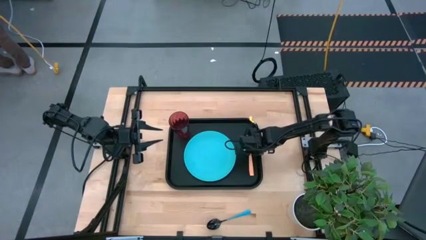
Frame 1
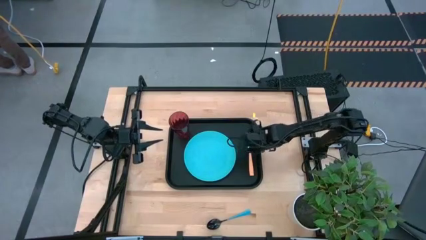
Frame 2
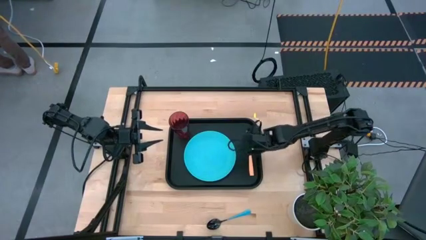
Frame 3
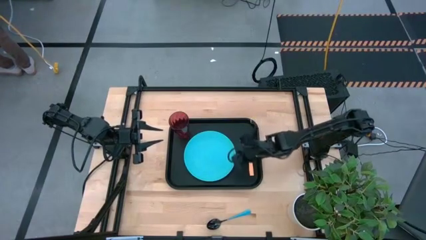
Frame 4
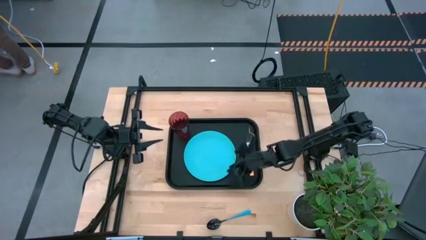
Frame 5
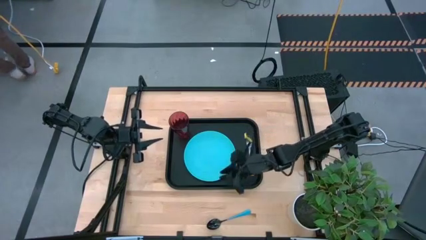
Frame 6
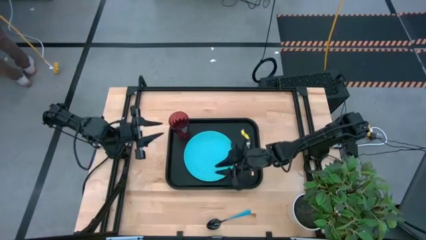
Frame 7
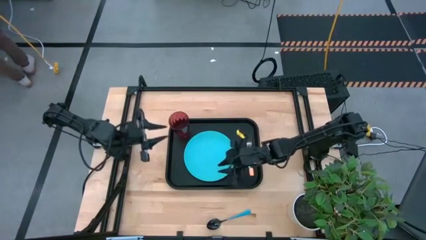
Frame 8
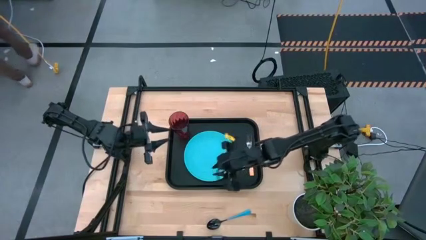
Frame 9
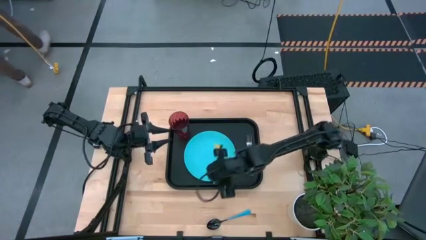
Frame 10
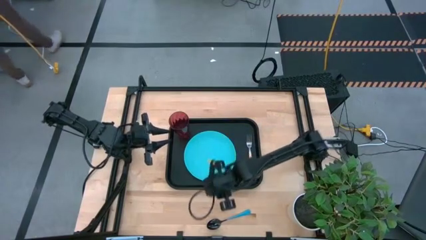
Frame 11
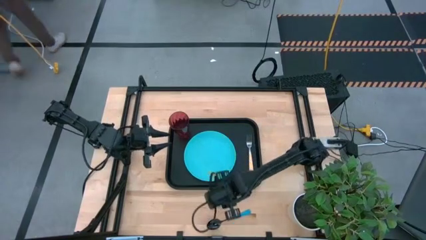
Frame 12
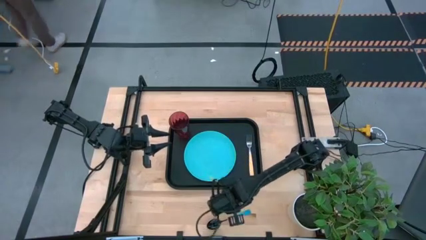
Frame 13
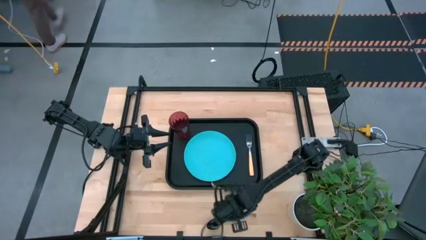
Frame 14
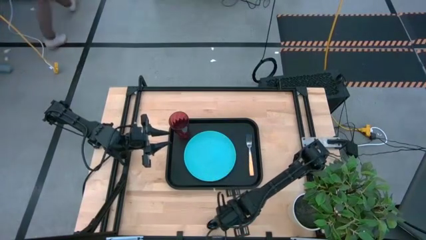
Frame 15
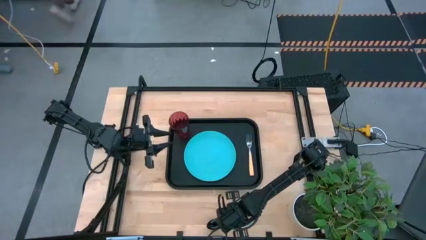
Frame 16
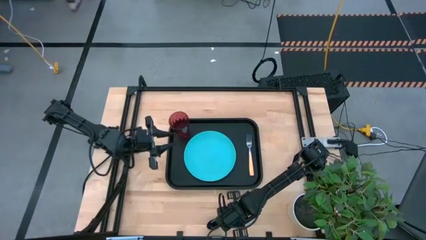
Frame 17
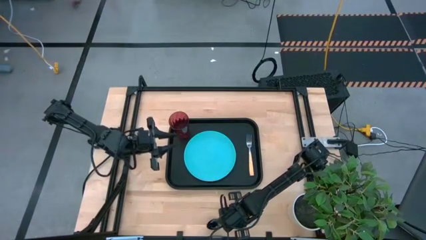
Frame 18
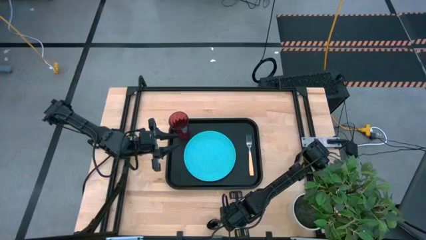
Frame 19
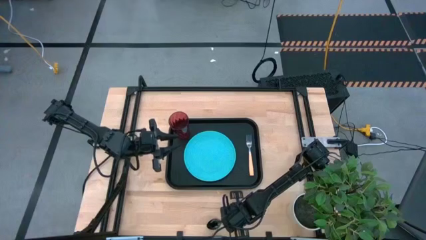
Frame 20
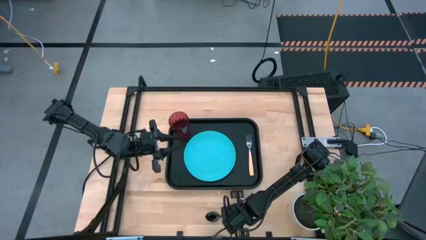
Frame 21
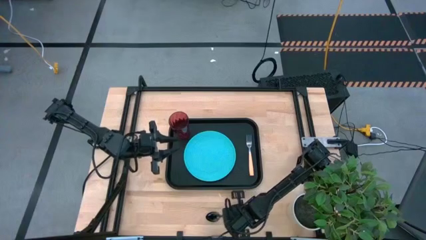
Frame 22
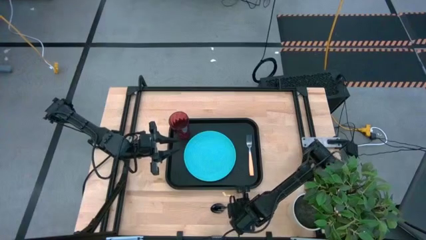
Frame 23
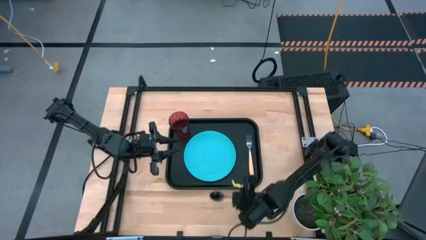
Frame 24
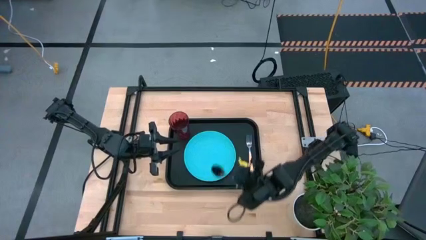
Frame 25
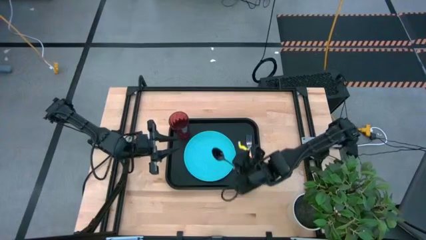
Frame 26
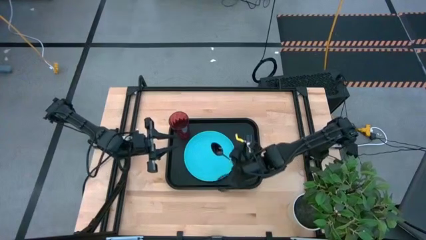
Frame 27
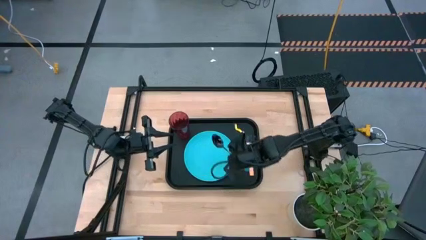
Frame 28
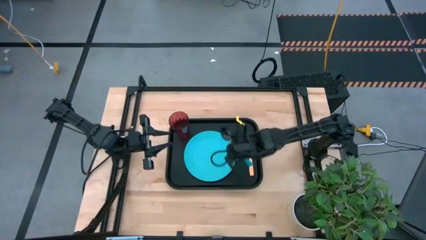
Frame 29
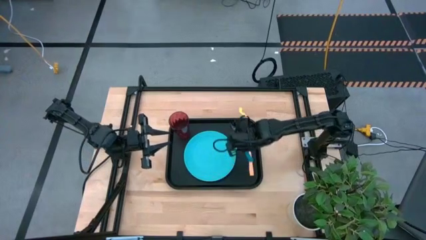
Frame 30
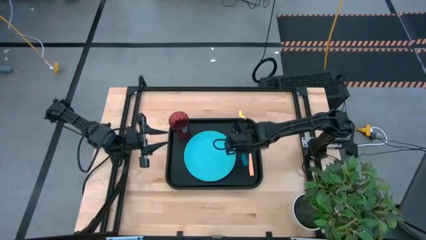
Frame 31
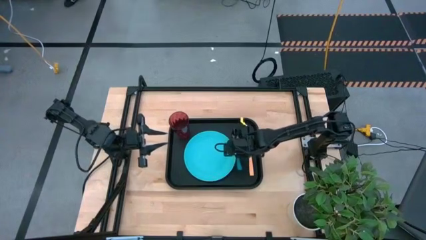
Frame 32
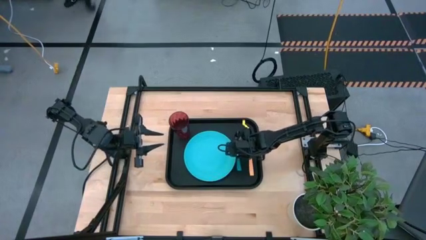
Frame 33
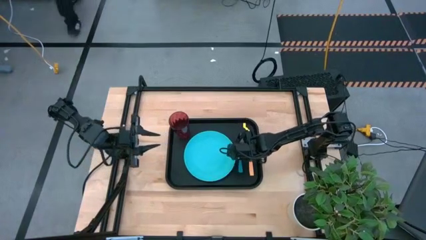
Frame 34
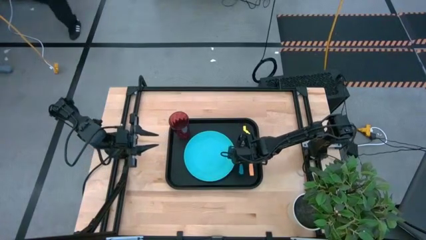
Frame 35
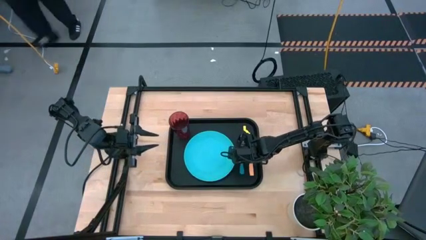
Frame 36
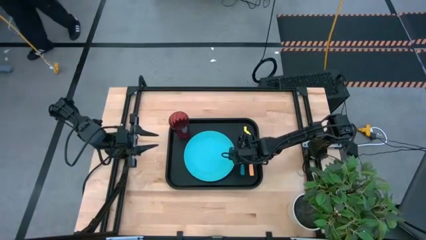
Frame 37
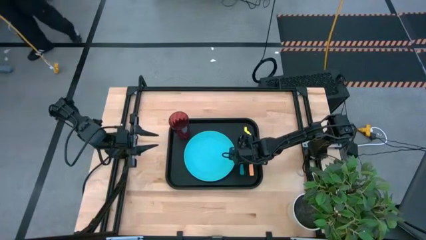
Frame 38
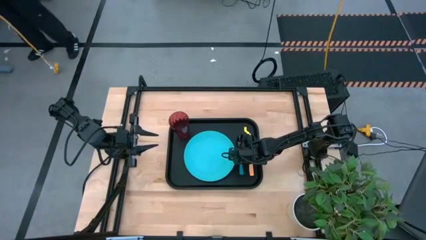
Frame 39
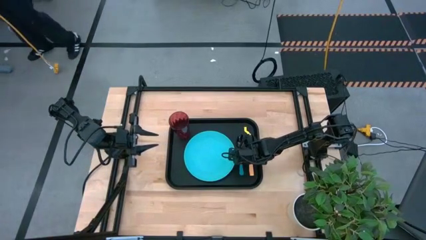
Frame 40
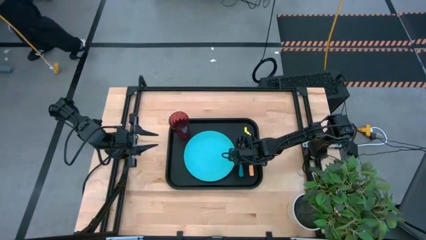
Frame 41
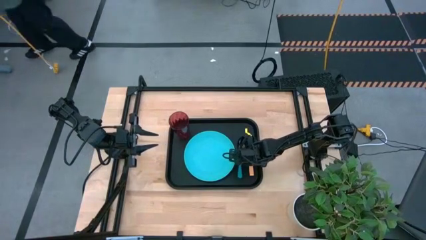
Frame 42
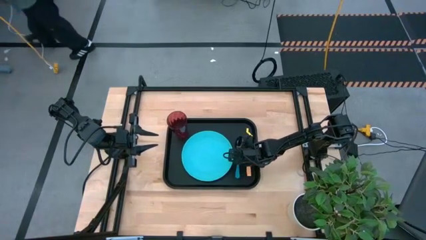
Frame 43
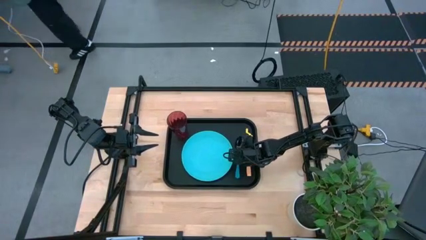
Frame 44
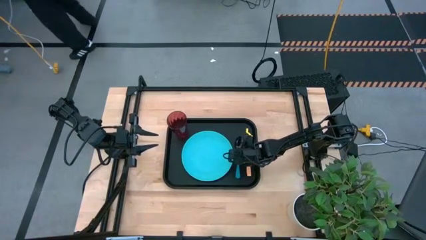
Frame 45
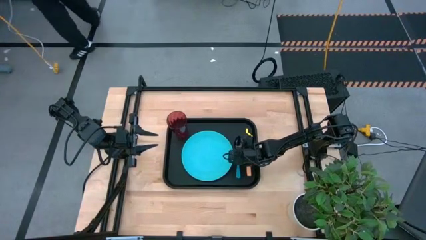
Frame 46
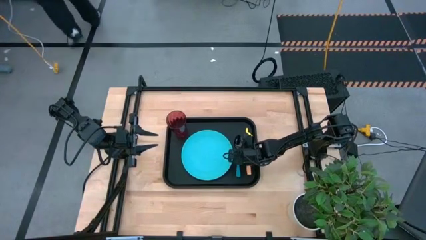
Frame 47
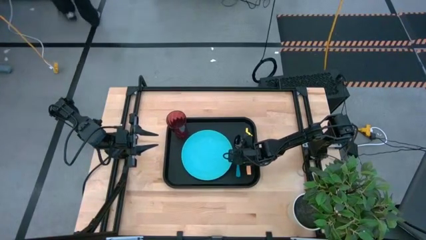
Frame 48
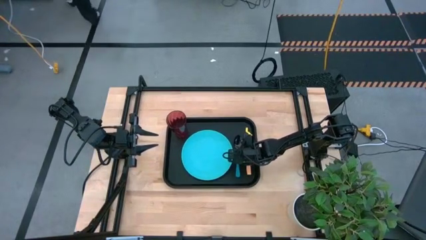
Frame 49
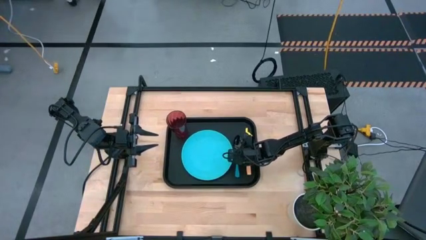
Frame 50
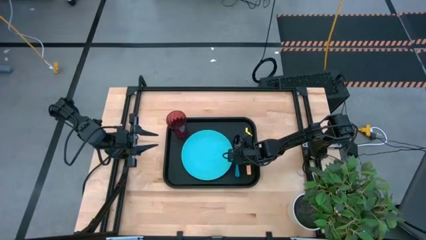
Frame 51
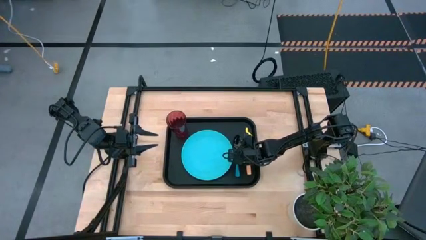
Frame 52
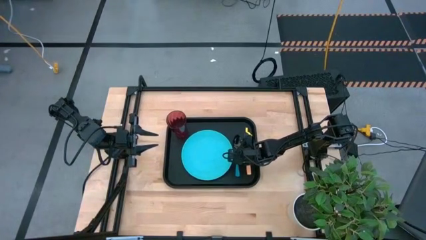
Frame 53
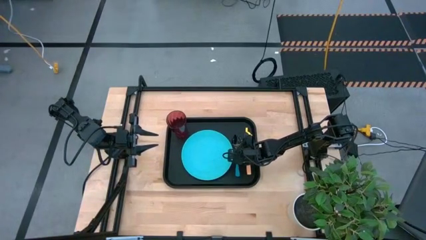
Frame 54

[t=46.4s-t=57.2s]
Task: Pick and place plate/cup/fork/spoon on tray
Put the spoon on the black food tray

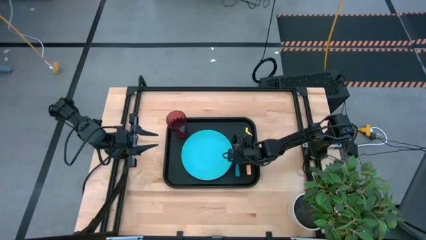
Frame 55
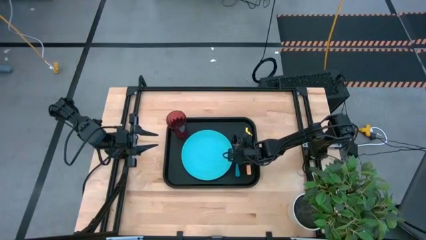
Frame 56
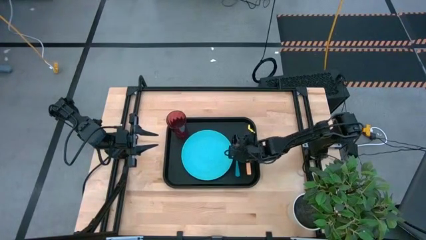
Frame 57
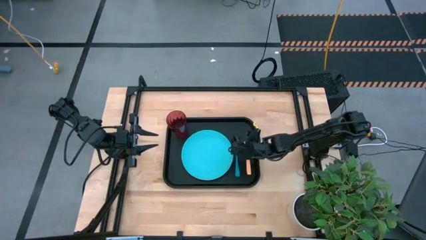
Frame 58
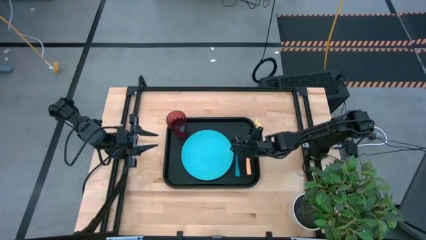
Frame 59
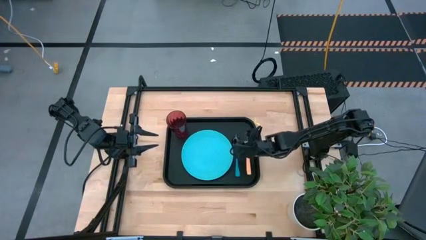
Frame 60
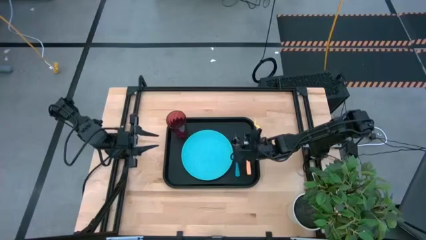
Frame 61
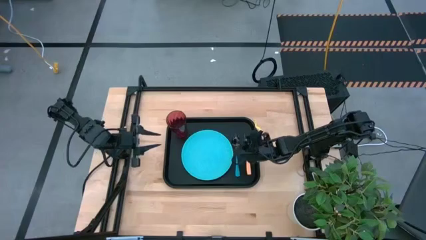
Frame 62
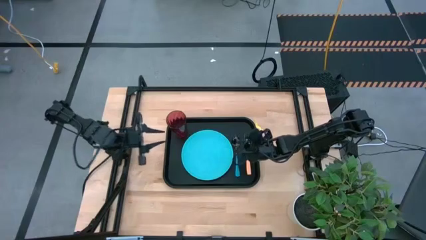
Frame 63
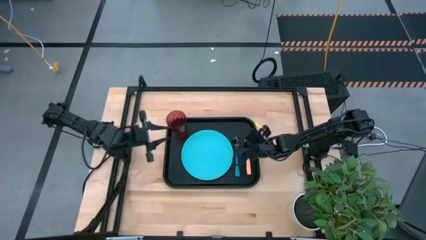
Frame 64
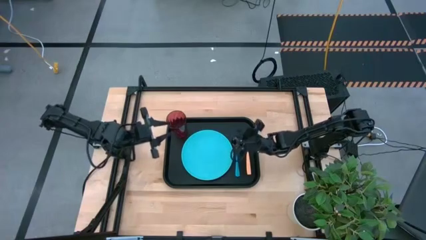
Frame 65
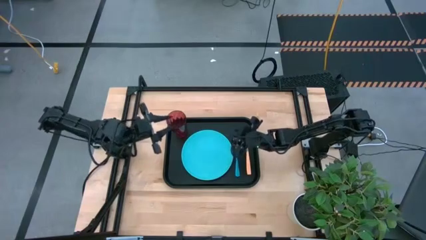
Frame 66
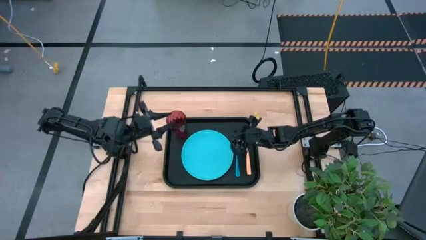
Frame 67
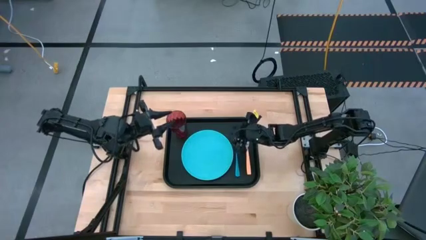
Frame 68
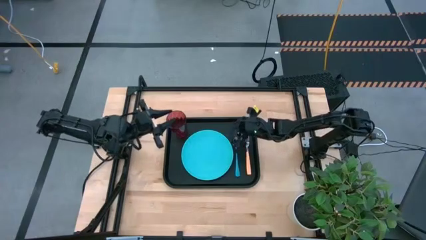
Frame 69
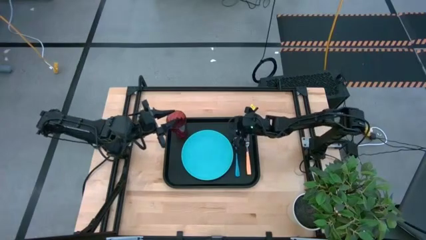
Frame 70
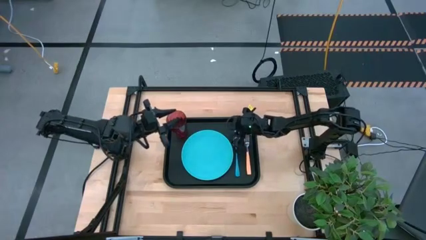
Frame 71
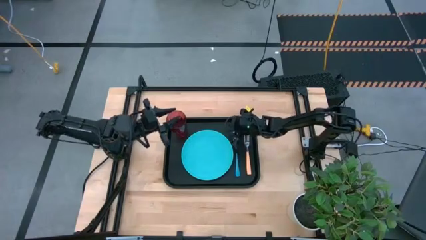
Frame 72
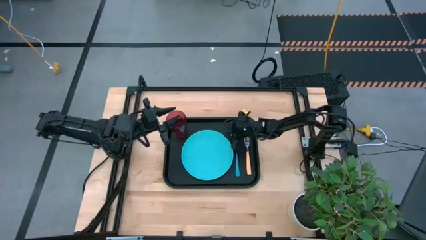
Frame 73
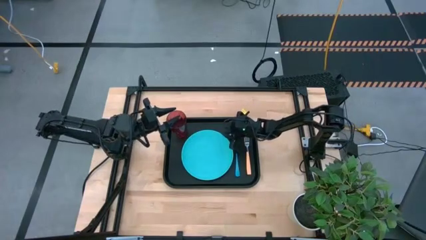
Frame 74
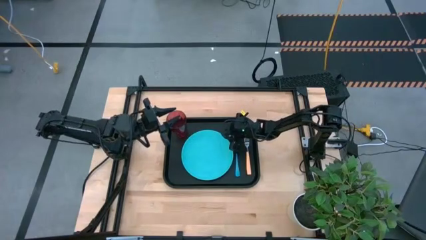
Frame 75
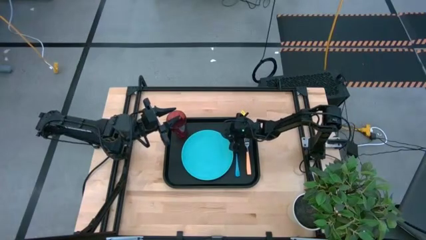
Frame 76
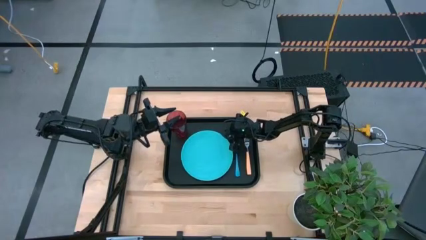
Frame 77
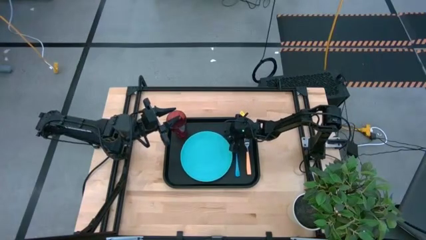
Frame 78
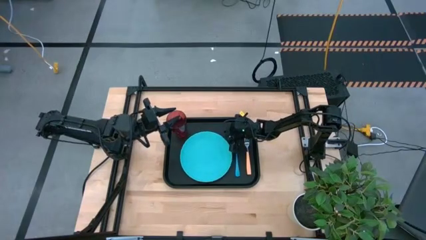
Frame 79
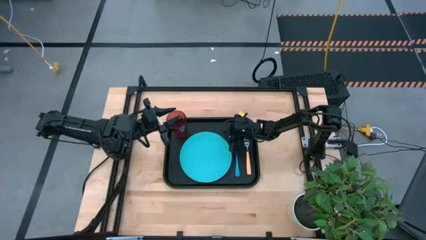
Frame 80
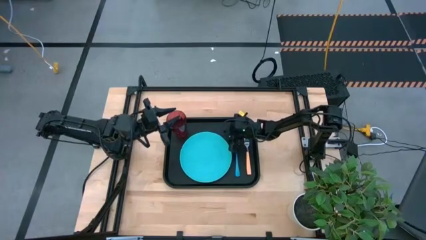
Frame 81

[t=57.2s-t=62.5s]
Adjust the blue dish
